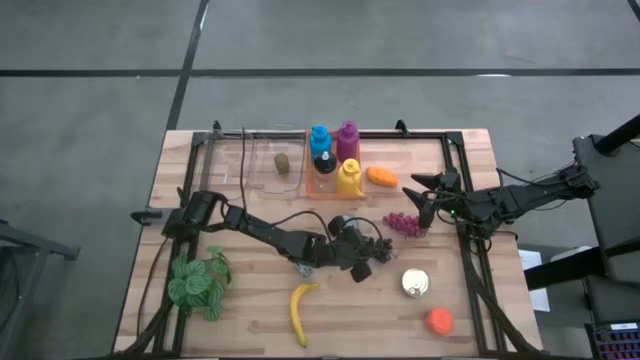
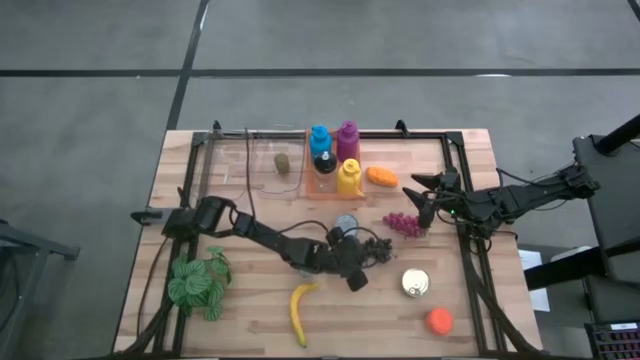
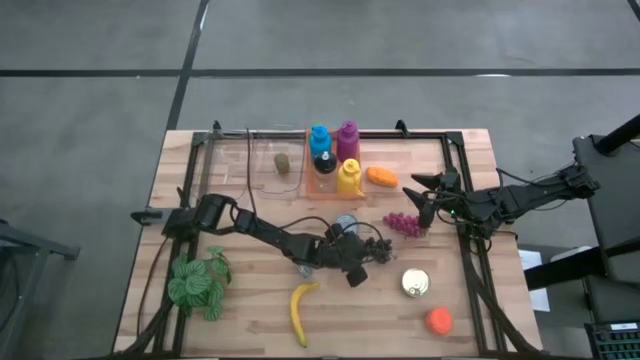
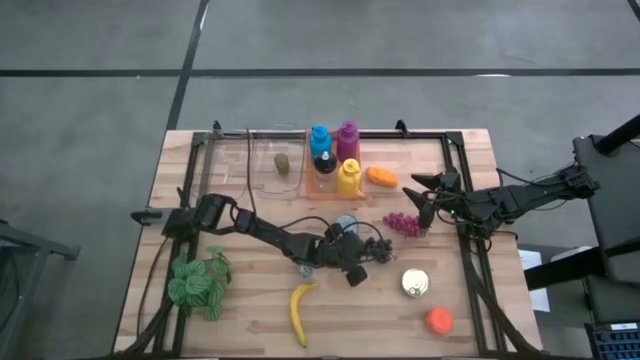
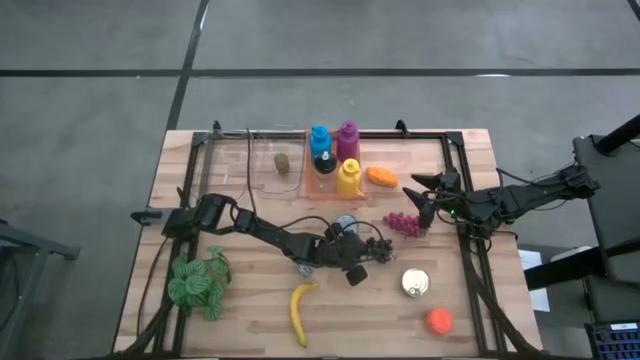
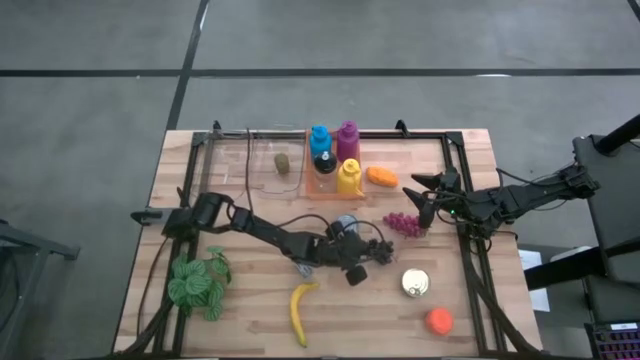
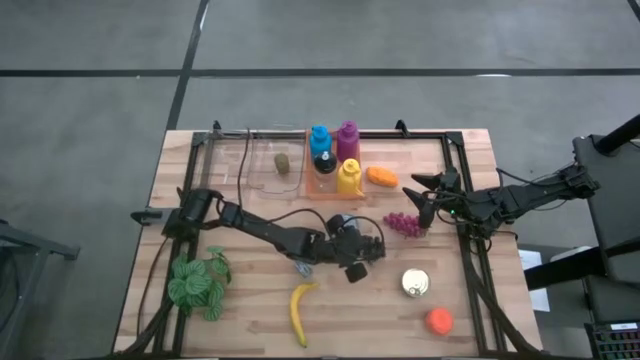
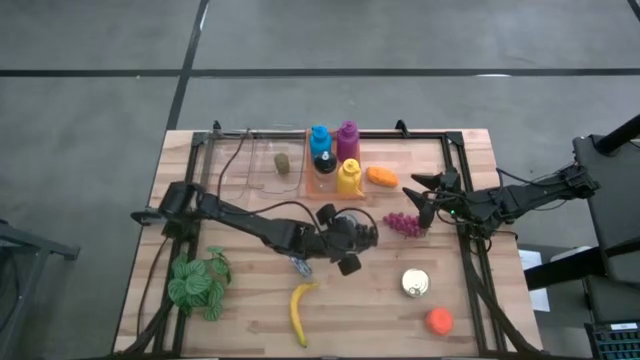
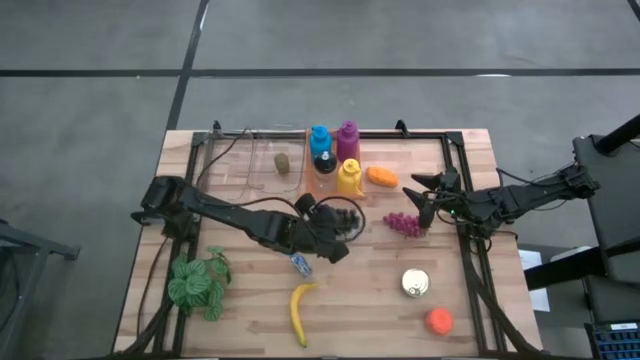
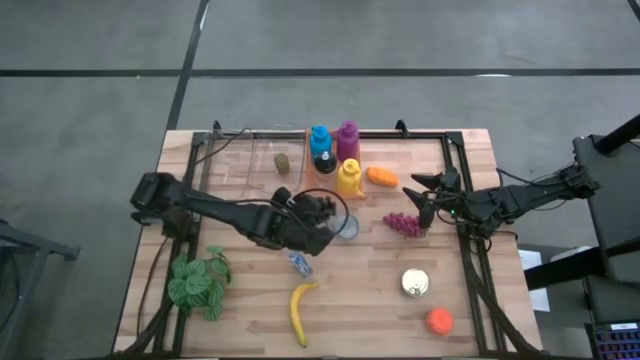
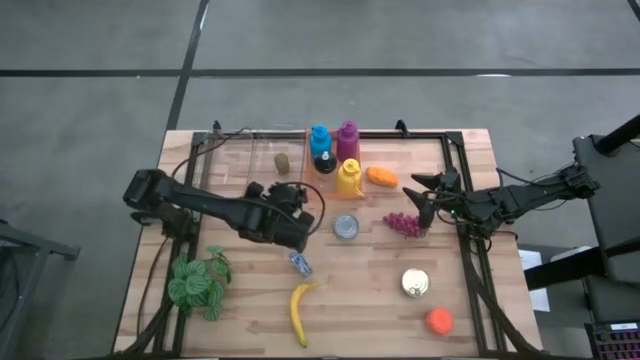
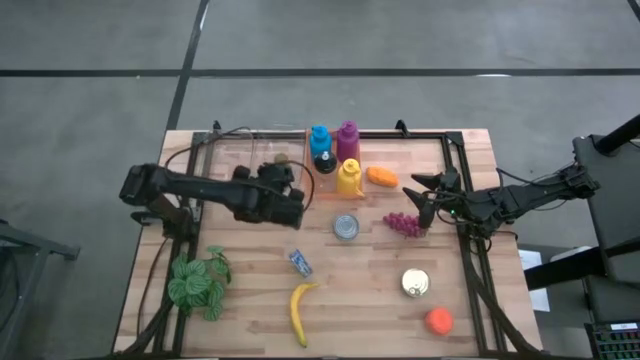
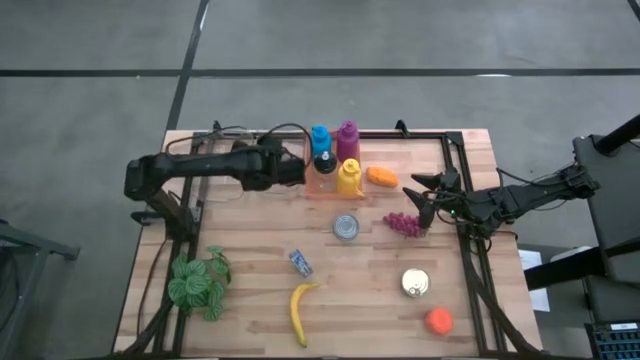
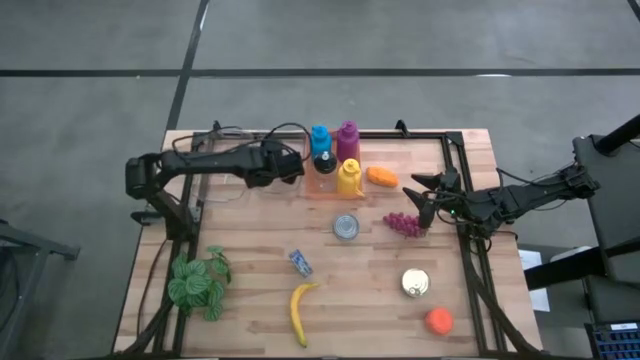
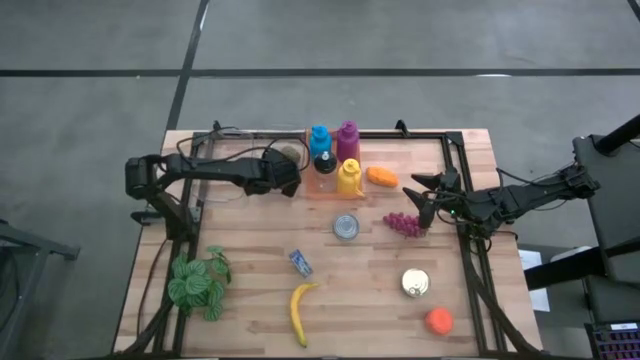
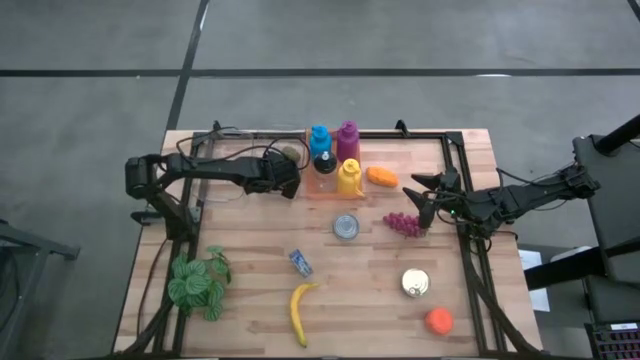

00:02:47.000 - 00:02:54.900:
Task: Pick & Place Food Item
Put the black grapes into the right transparent bin

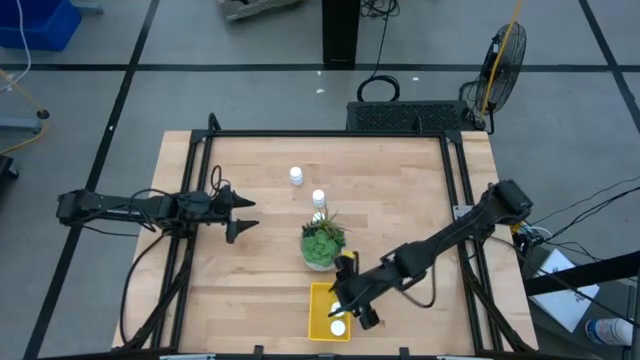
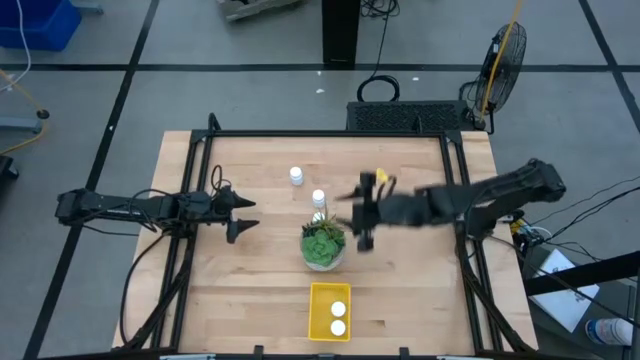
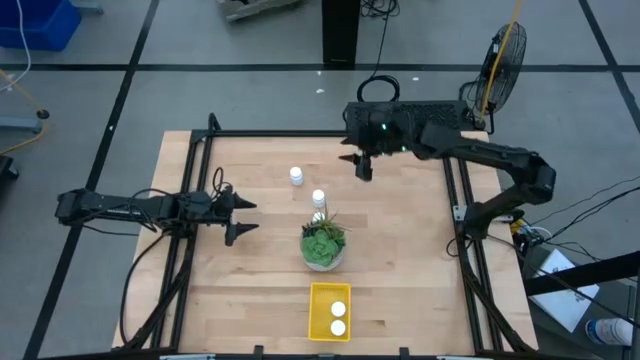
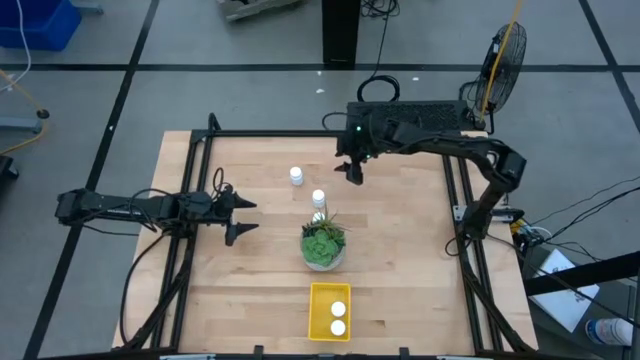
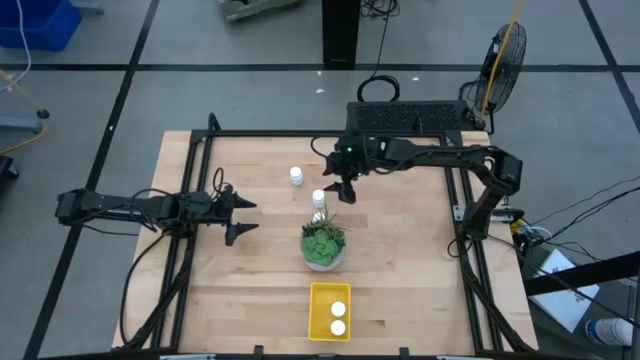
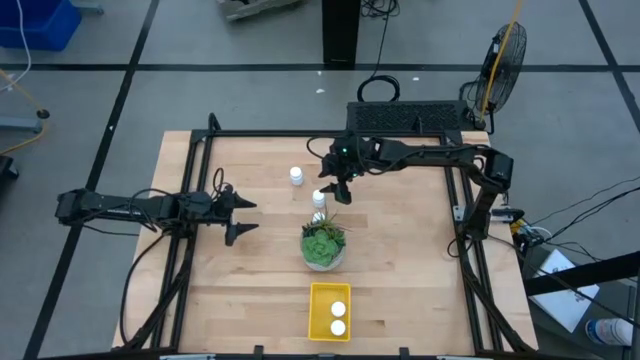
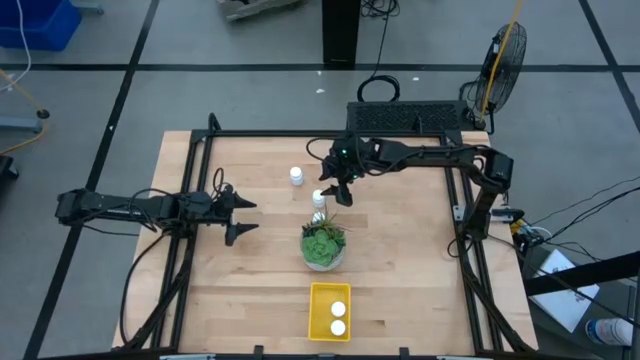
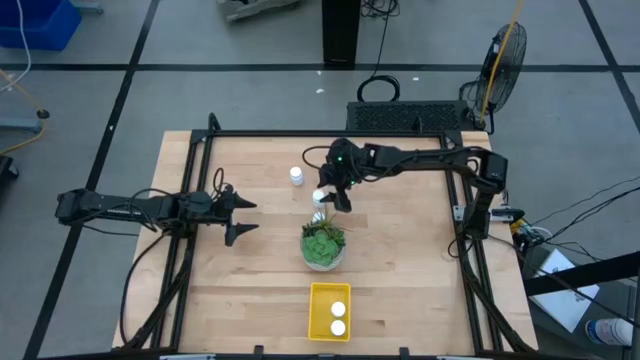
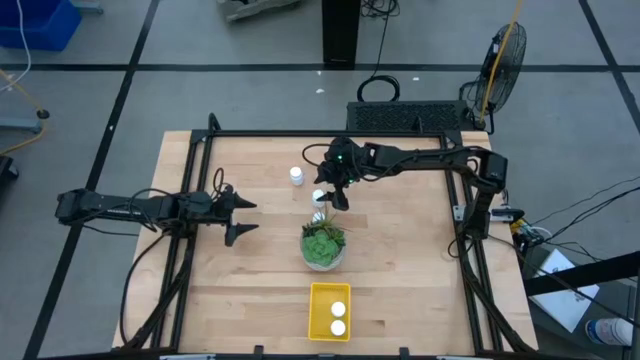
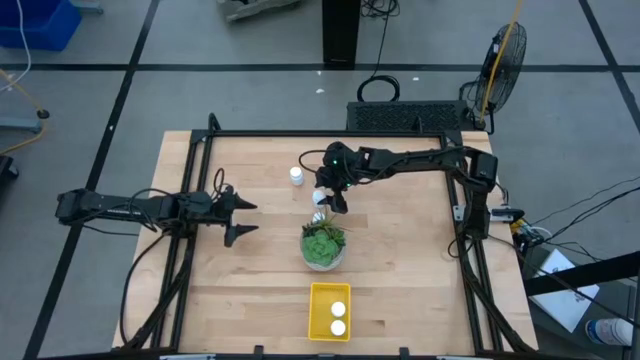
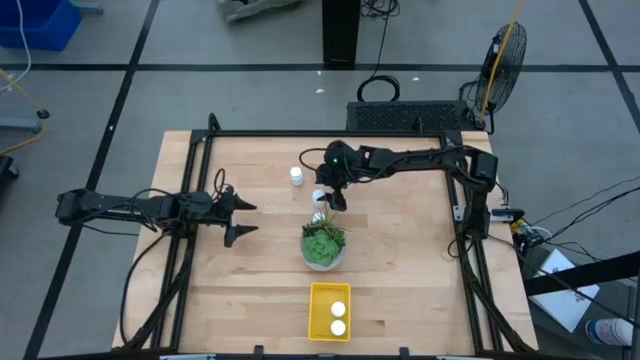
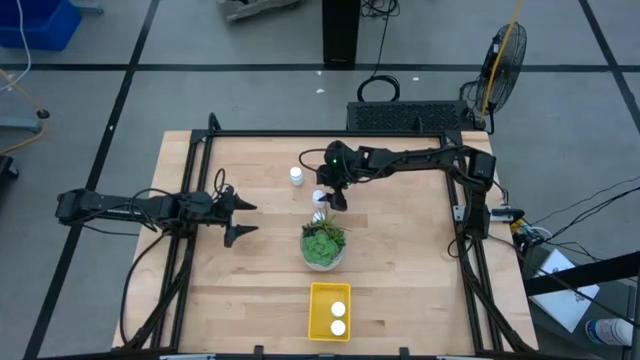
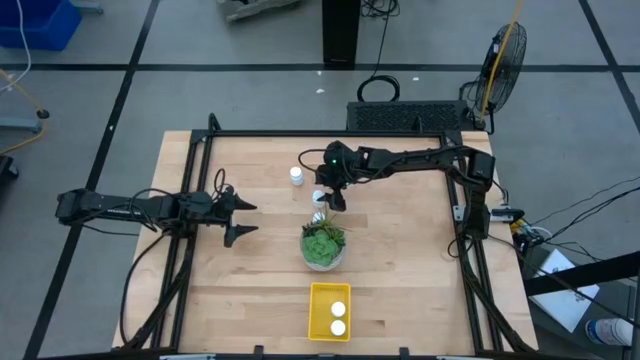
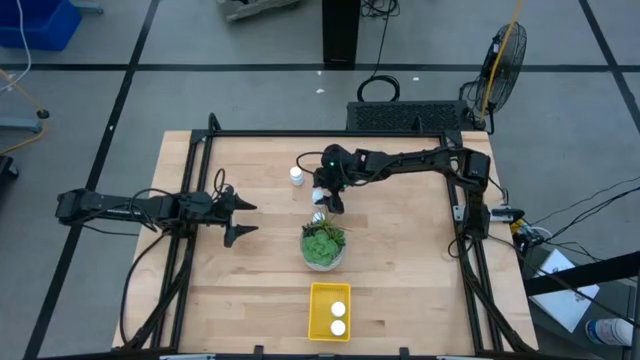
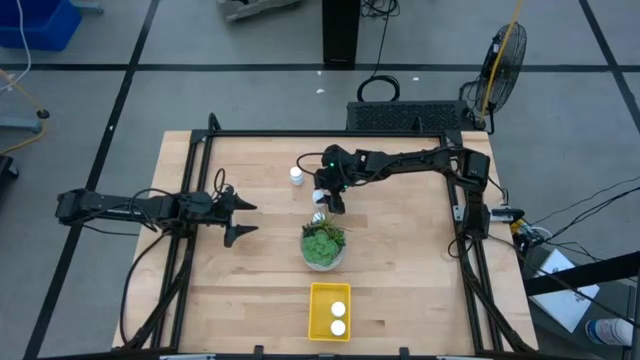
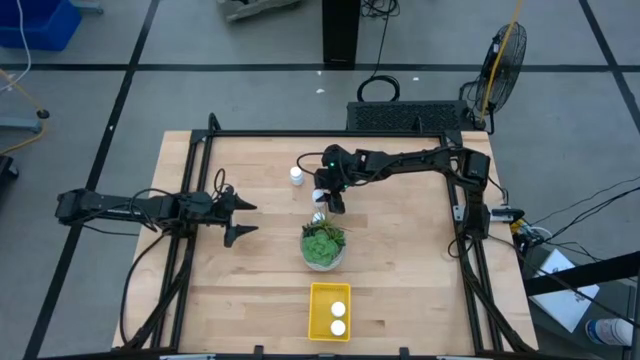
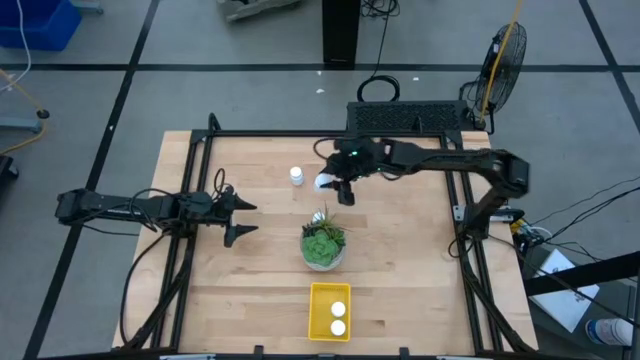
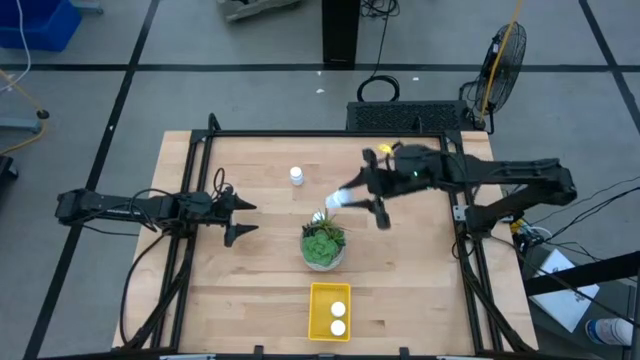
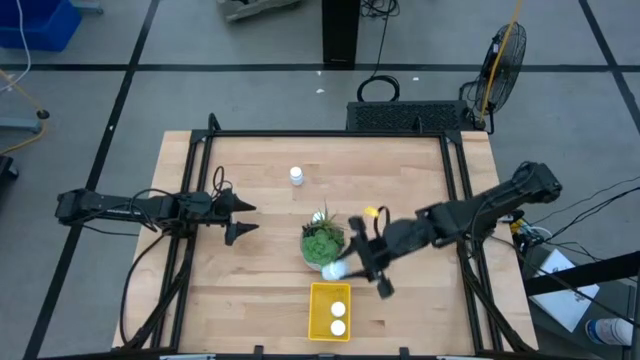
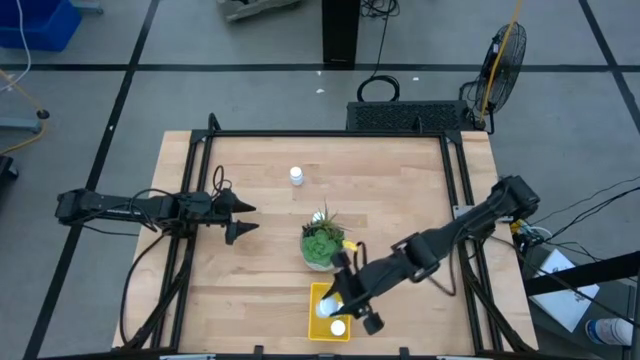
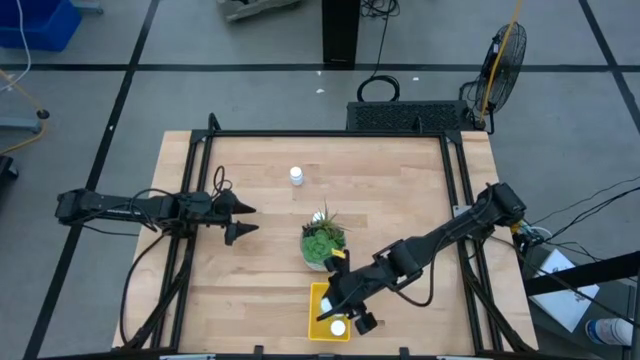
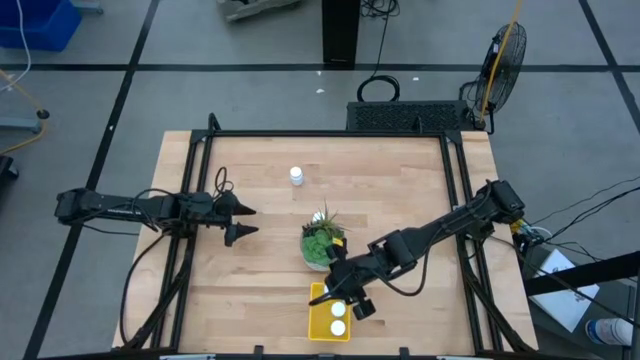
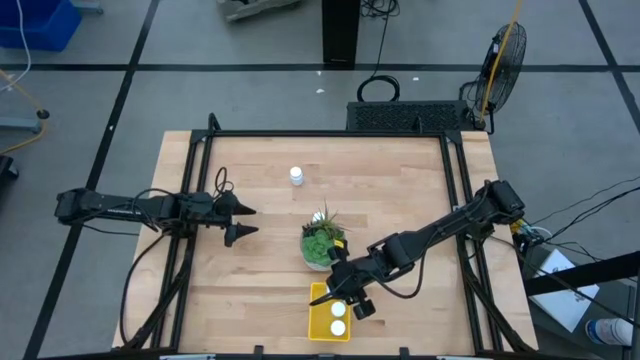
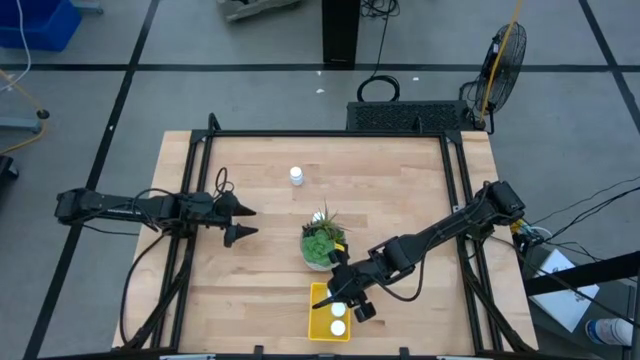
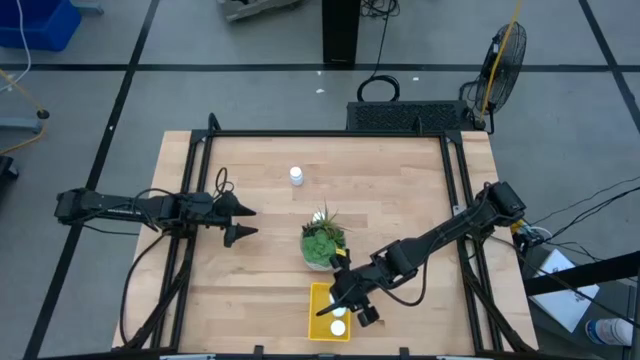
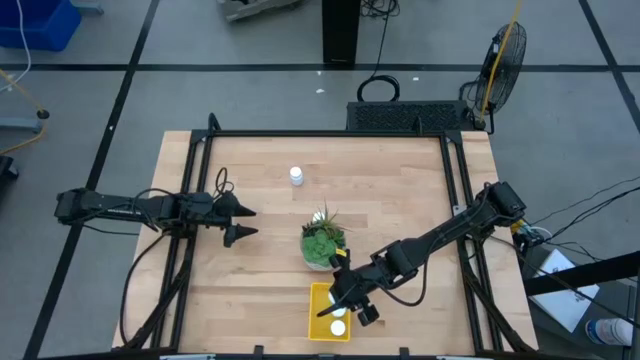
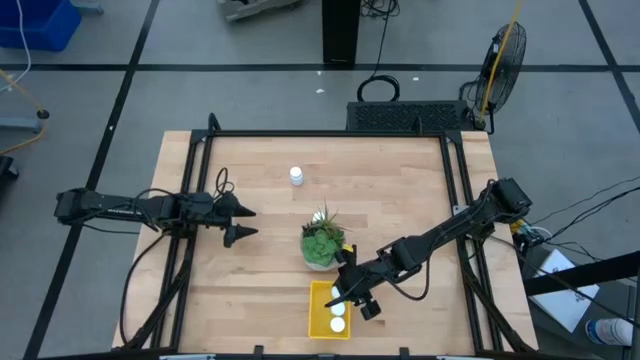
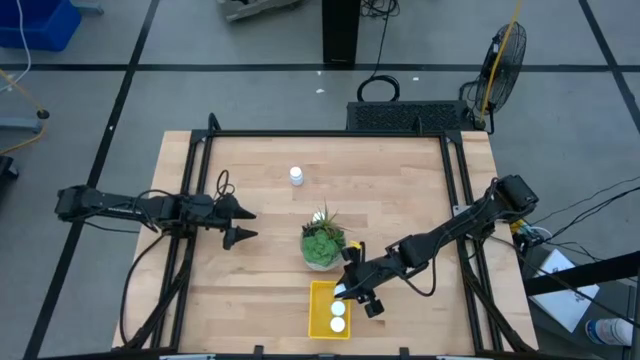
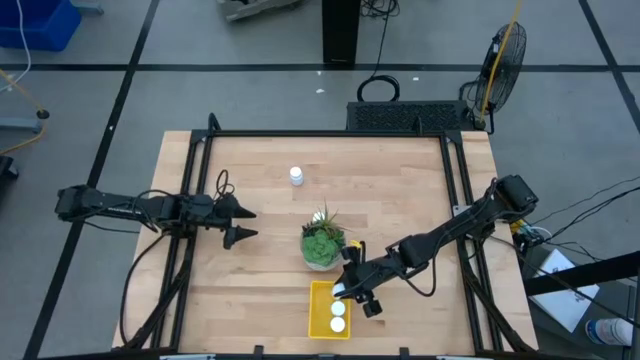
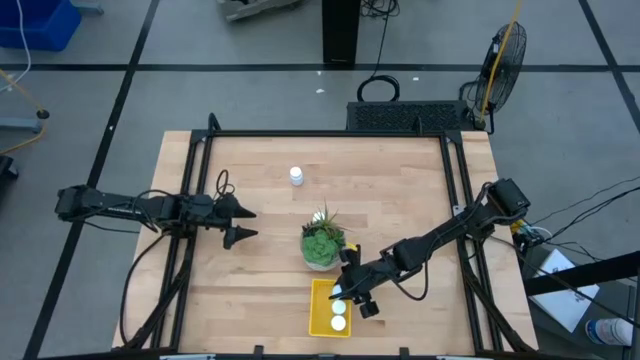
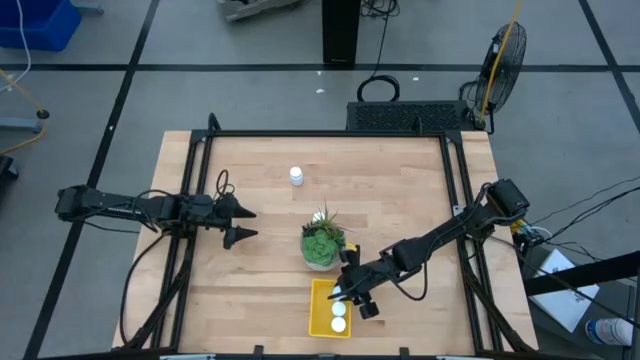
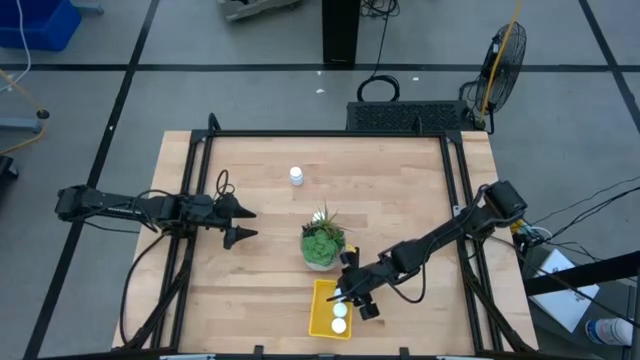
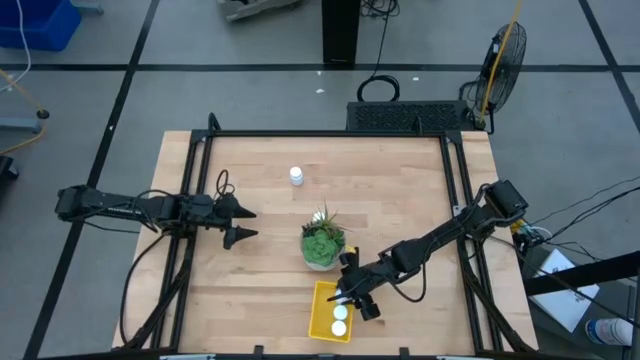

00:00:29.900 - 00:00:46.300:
Task: Pick and place pill bottles into a basket
Put the white pill bottle into the yellow bin
